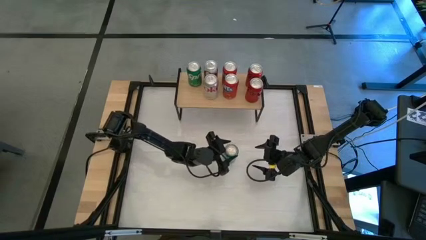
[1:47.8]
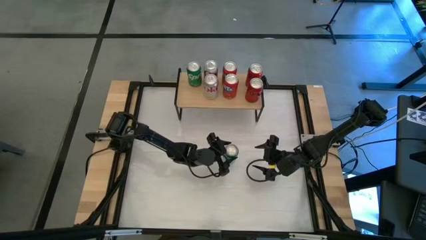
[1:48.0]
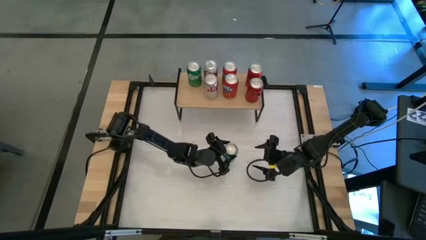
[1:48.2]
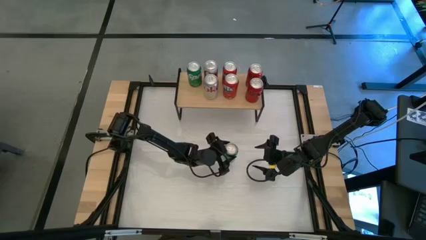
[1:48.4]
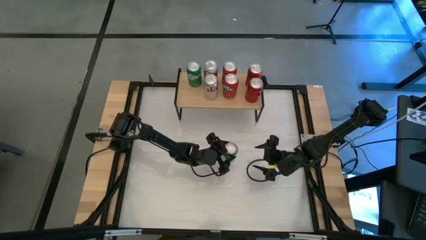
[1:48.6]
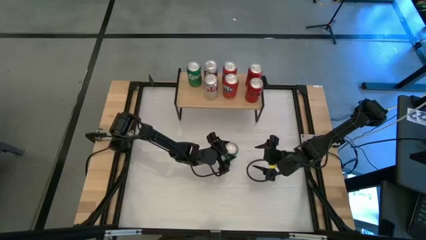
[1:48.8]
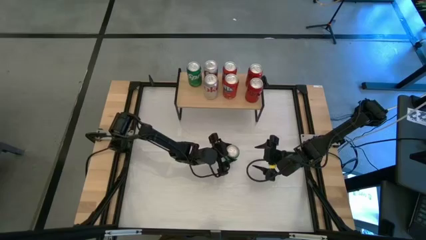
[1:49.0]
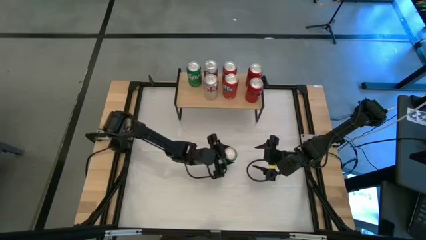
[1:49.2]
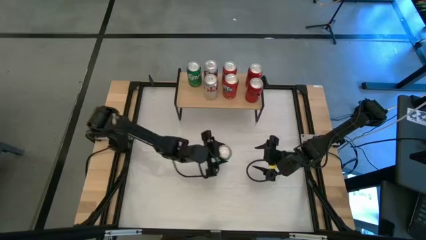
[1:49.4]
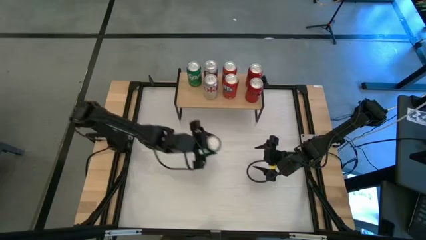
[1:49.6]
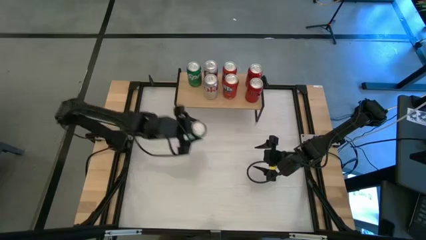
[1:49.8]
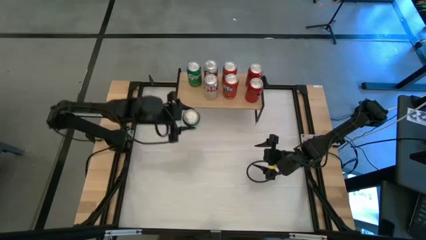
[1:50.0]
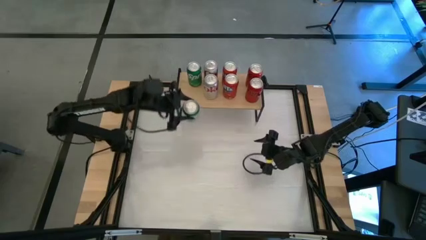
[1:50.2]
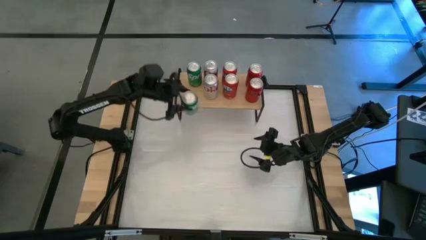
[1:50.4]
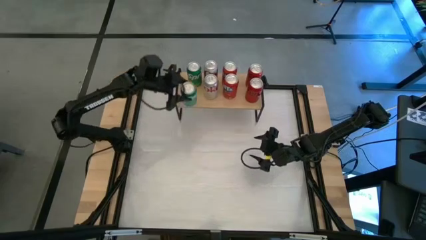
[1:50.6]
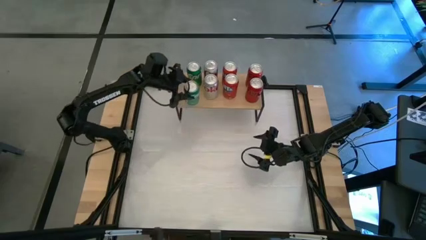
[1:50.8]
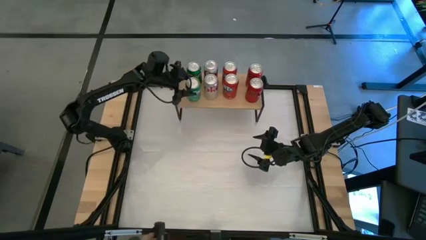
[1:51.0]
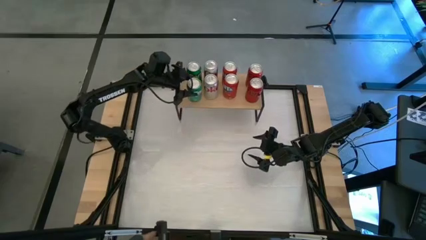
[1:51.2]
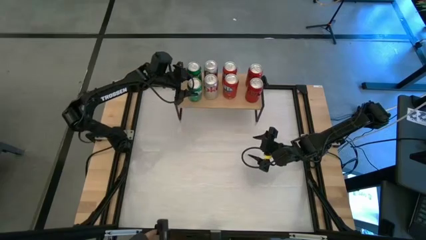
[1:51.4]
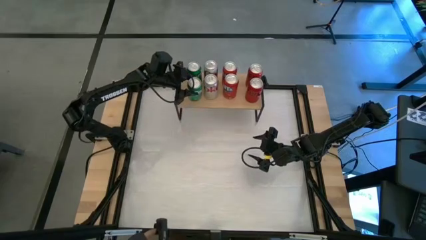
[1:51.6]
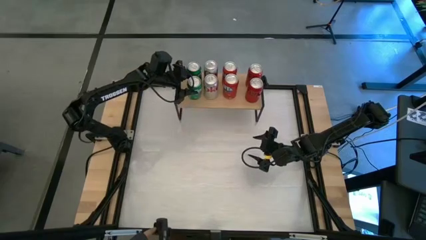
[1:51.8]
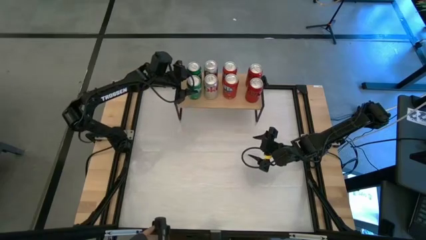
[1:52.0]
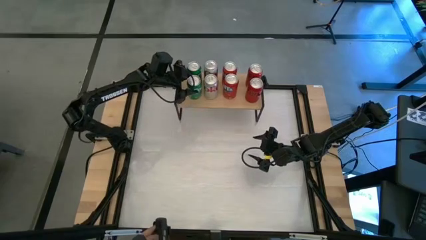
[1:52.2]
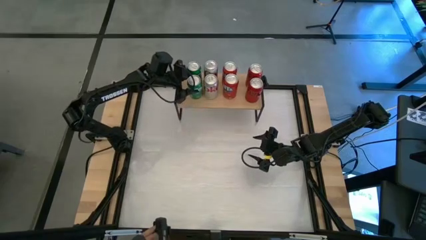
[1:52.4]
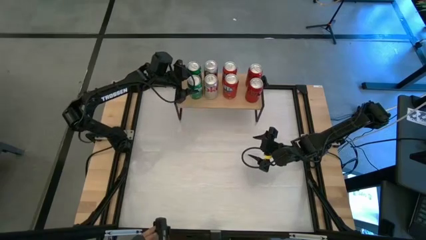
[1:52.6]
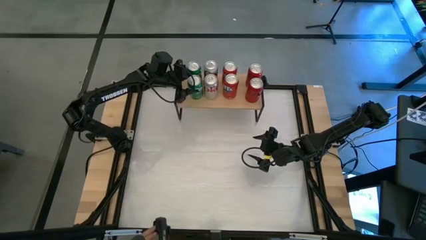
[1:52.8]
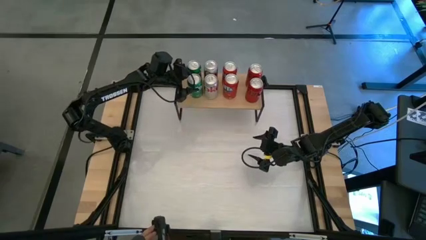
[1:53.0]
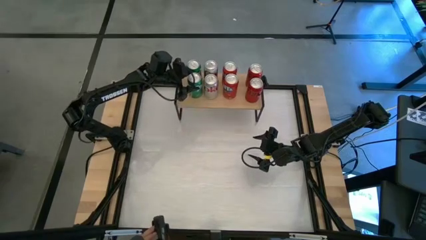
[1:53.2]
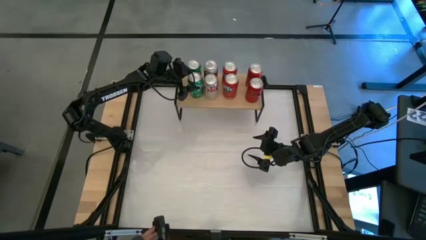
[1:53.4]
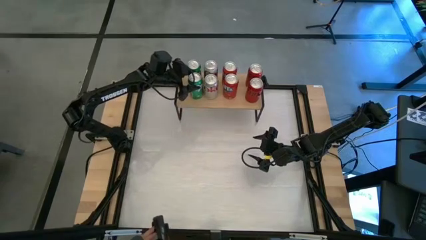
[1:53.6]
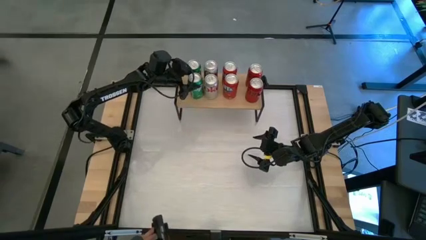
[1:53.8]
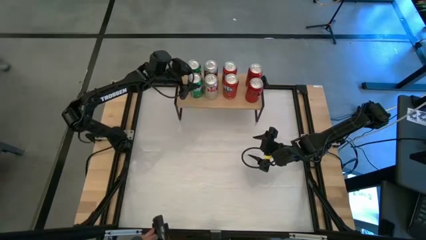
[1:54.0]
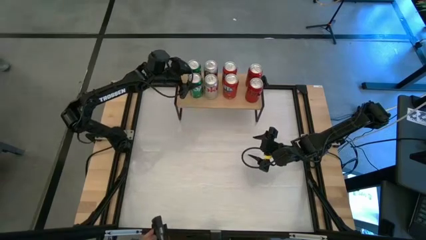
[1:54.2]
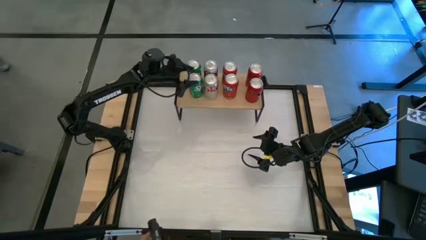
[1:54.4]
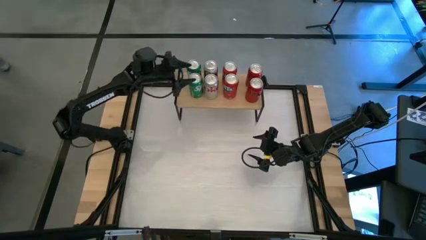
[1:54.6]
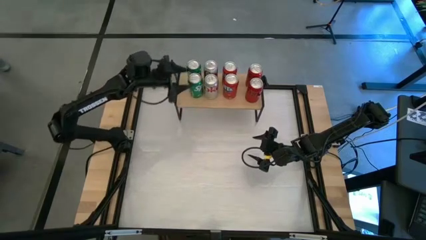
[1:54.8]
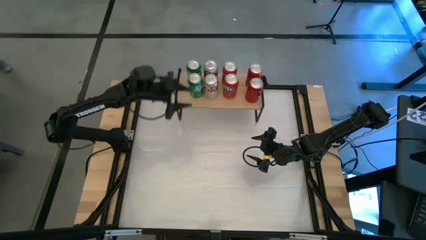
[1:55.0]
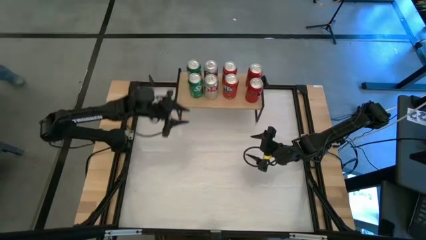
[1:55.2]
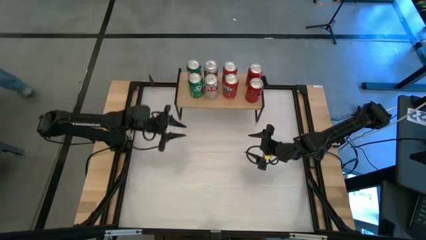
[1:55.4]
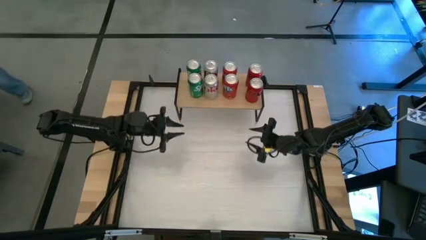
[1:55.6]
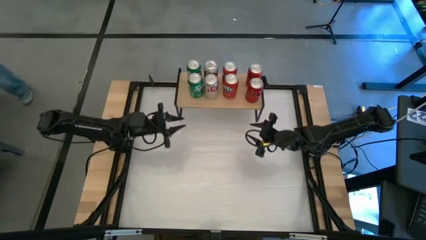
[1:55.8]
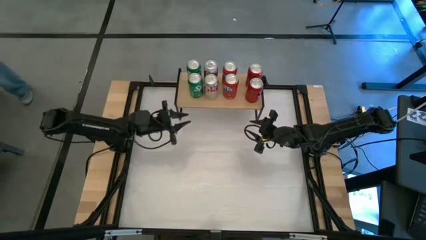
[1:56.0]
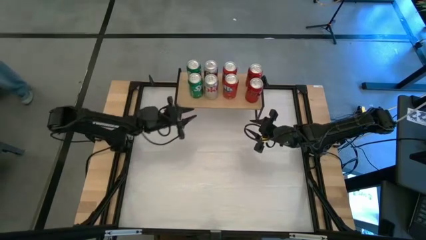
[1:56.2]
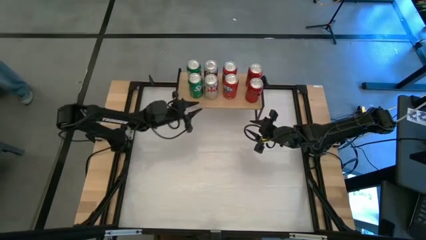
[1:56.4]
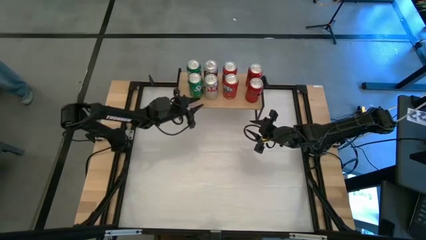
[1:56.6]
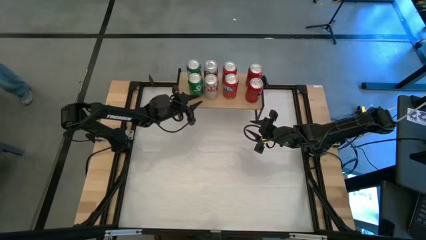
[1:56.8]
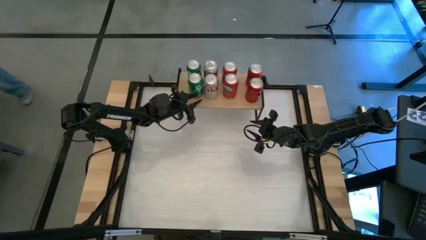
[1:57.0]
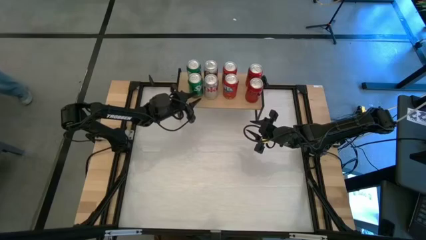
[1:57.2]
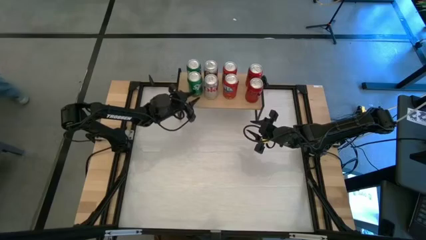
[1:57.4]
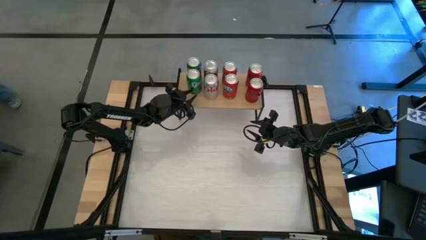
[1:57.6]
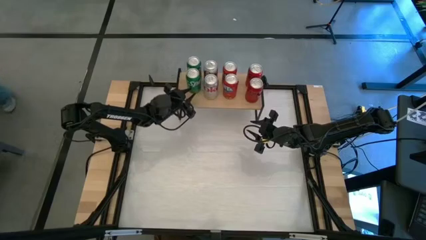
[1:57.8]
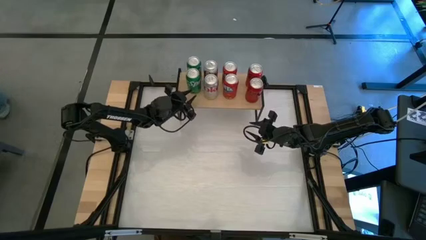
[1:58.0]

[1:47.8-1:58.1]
Task: Place canned beverage on shelf
Put the green soda can on the shelf and align with the other green soda can

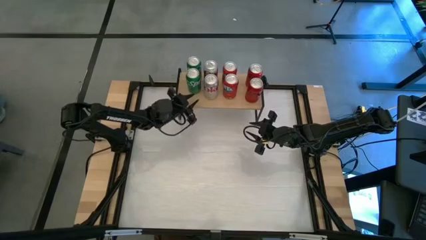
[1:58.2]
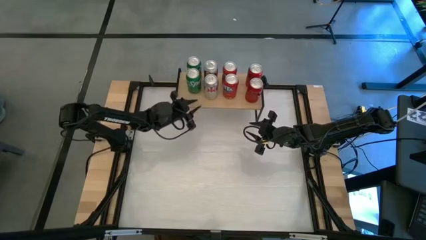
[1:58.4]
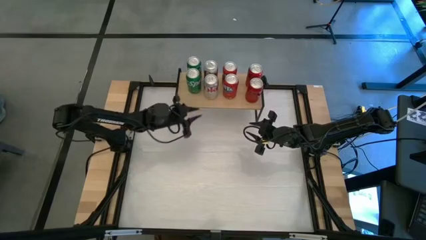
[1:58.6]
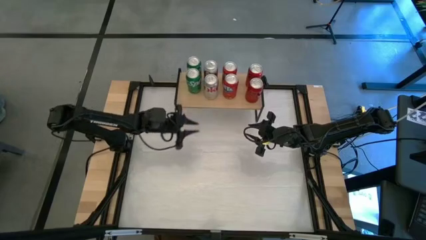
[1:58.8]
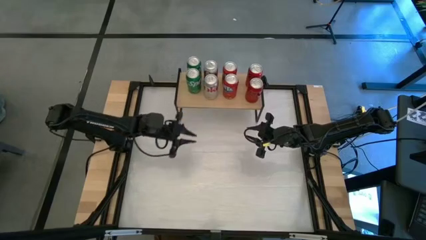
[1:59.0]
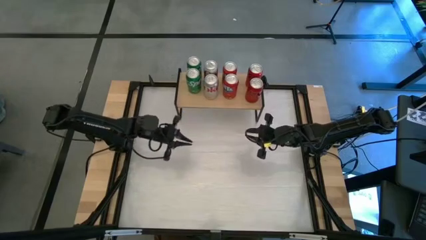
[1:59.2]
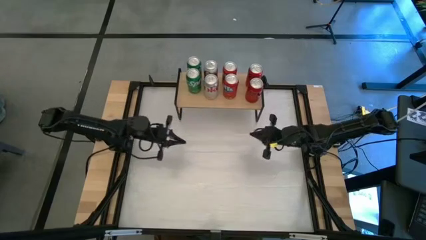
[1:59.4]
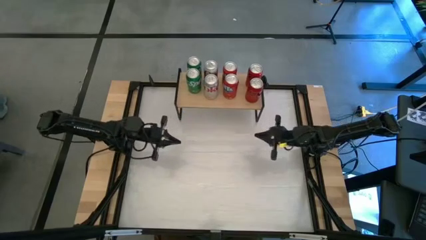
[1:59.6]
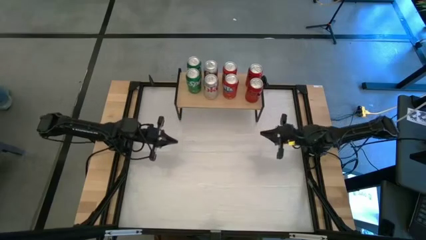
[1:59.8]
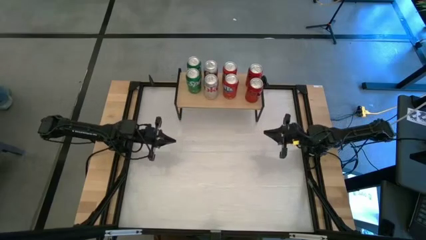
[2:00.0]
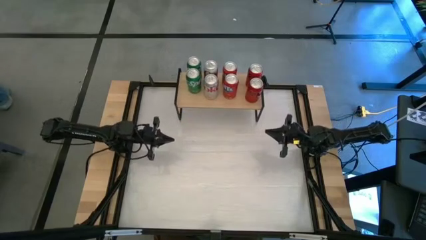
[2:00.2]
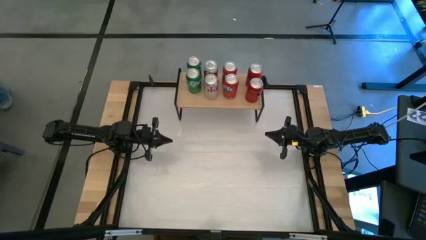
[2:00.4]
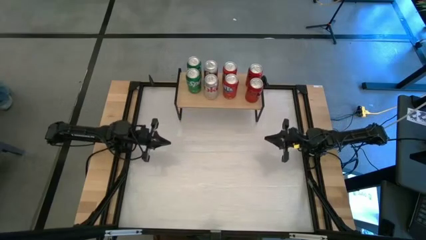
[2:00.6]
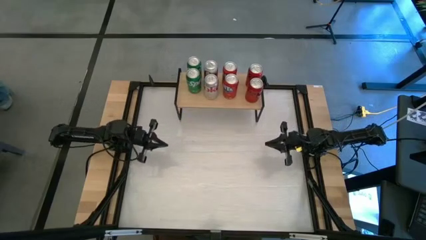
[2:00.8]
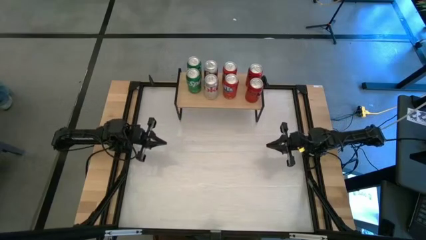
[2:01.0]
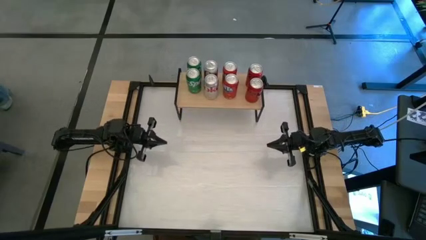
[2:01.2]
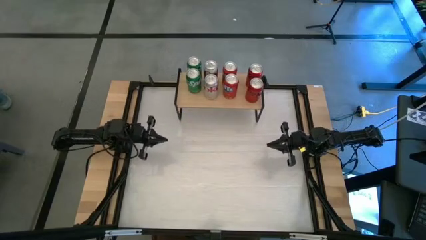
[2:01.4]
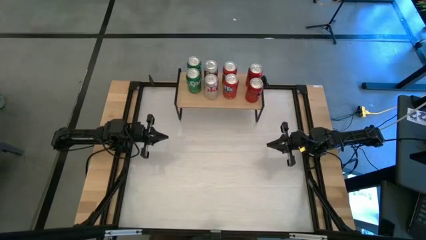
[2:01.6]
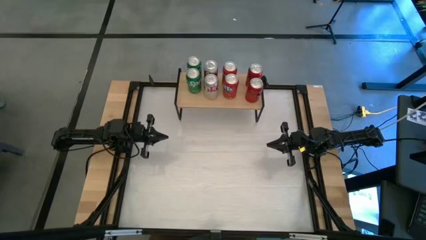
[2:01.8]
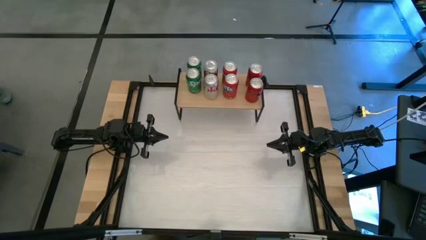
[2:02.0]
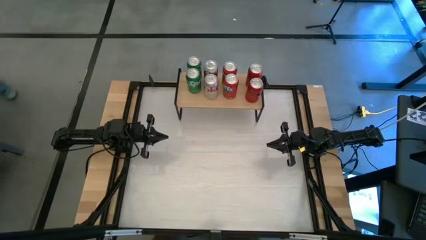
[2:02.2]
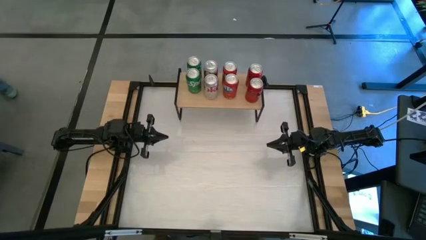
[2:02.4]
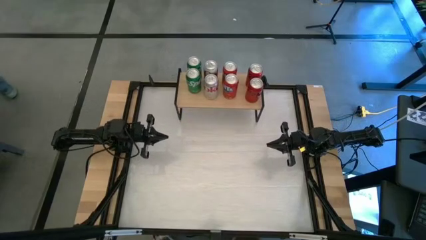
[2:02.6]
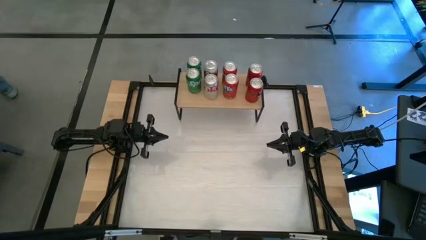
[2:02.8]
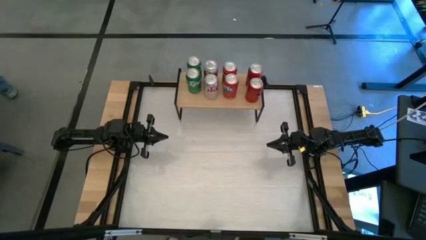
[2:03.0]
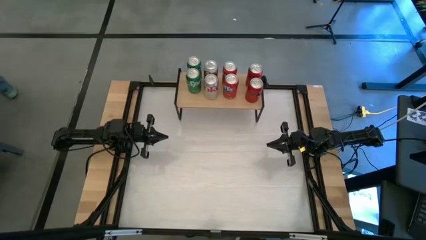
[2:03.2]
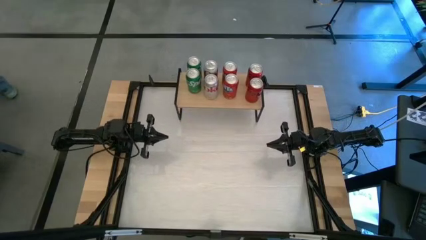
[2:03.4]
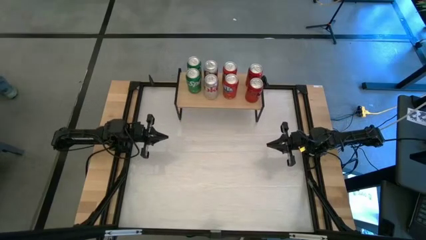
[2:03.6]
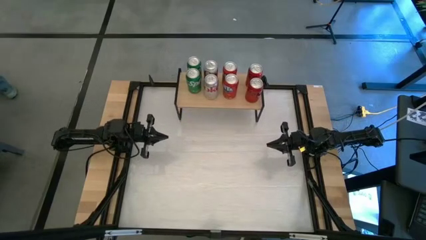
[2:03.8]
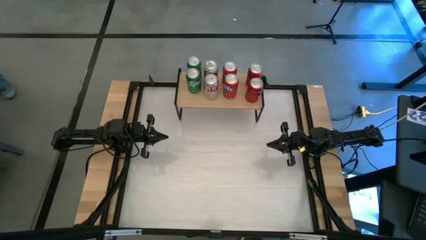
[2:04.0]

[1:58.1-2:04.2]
Return to Home Position
